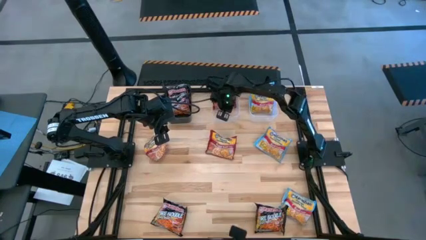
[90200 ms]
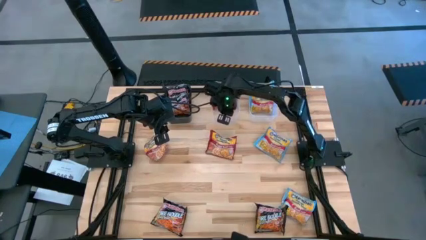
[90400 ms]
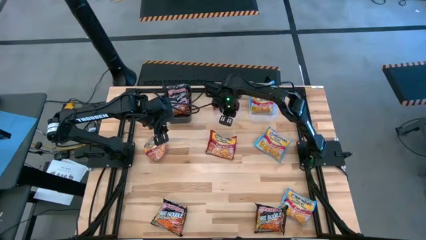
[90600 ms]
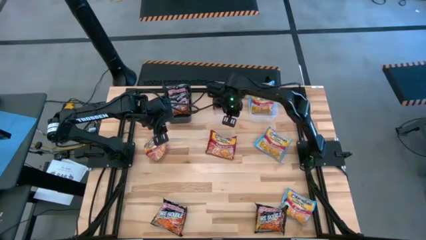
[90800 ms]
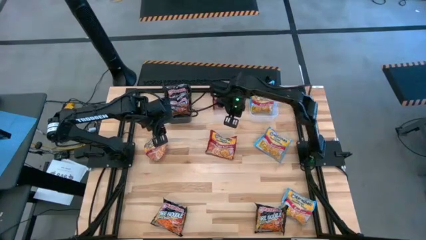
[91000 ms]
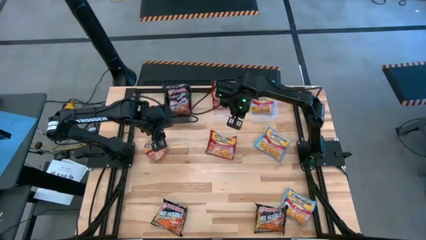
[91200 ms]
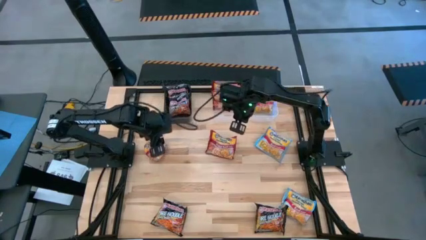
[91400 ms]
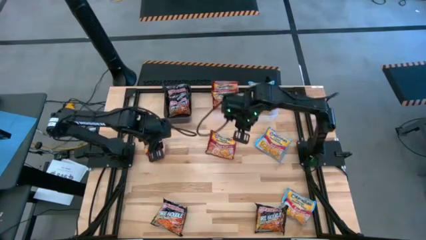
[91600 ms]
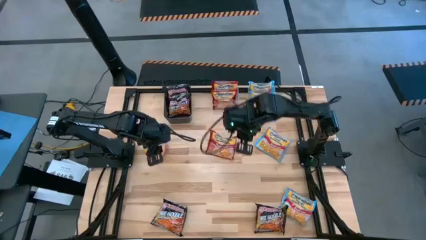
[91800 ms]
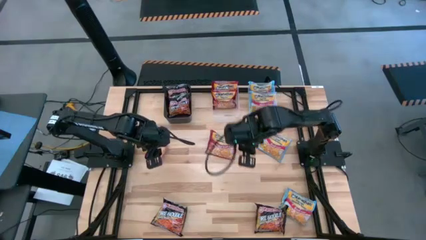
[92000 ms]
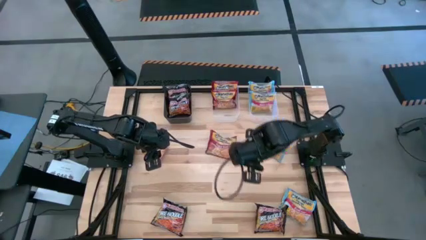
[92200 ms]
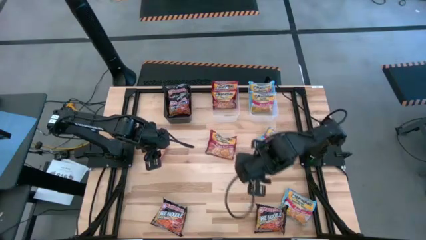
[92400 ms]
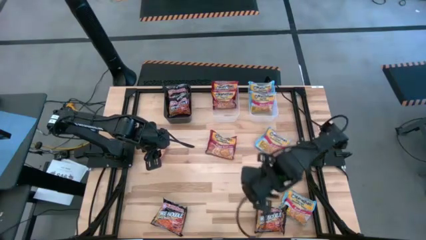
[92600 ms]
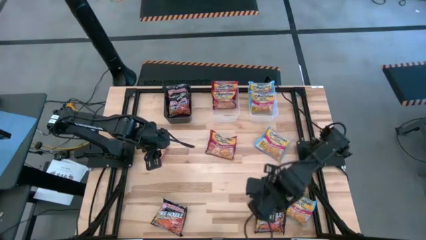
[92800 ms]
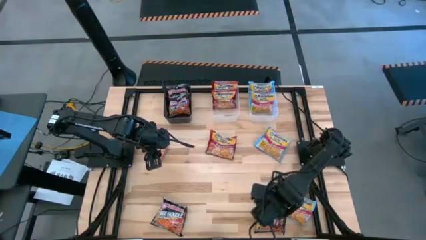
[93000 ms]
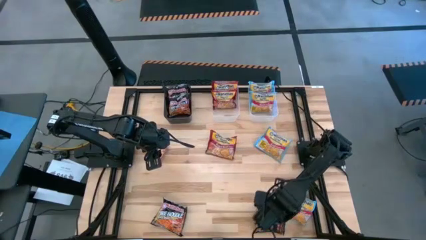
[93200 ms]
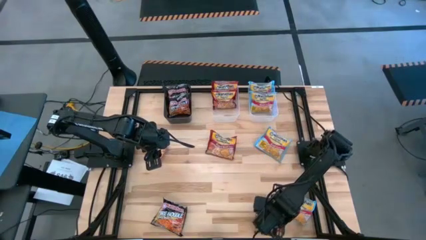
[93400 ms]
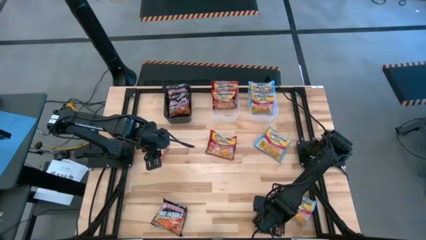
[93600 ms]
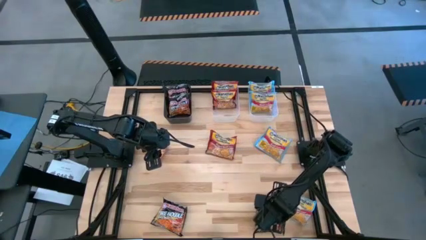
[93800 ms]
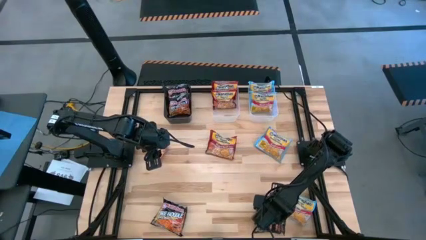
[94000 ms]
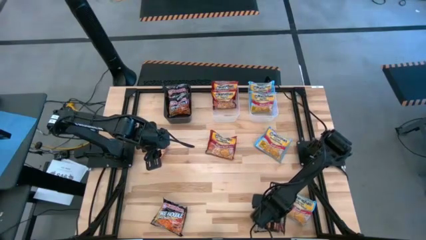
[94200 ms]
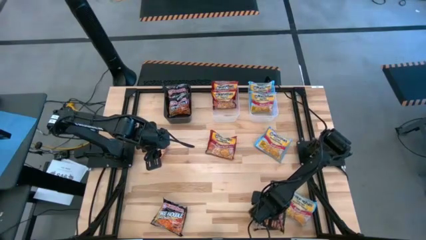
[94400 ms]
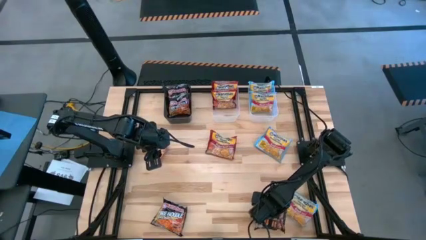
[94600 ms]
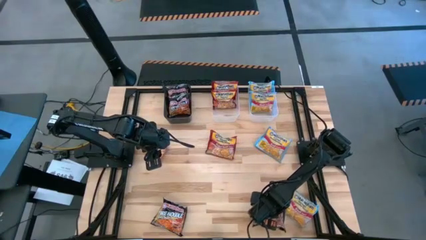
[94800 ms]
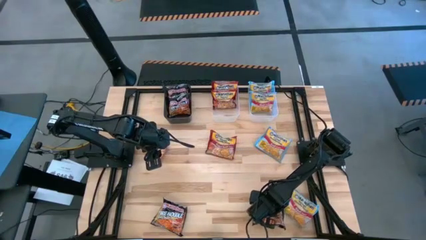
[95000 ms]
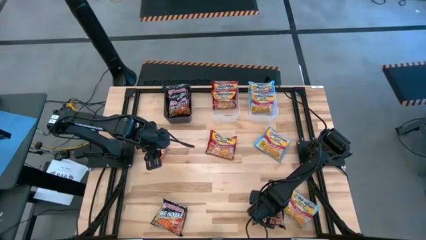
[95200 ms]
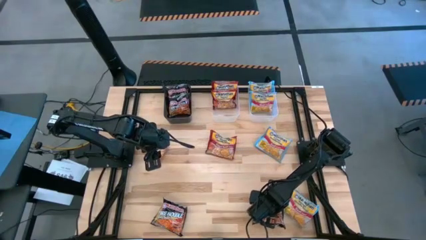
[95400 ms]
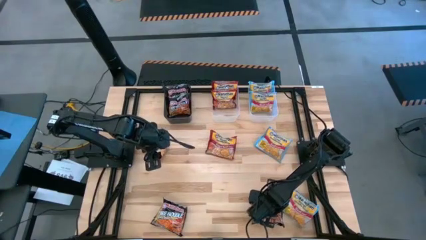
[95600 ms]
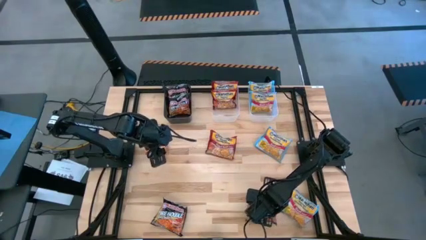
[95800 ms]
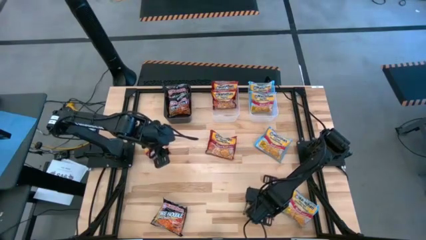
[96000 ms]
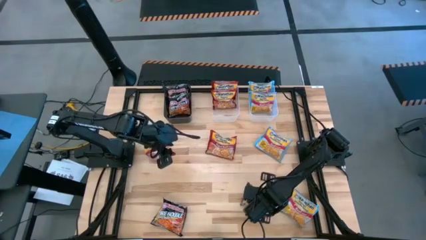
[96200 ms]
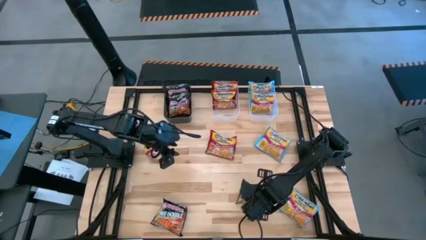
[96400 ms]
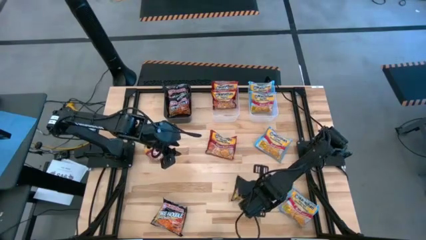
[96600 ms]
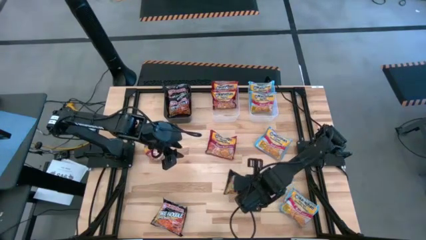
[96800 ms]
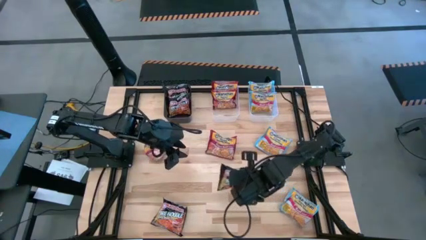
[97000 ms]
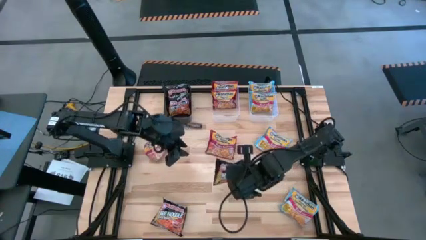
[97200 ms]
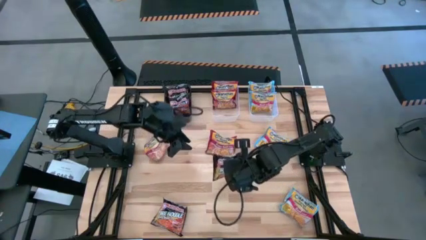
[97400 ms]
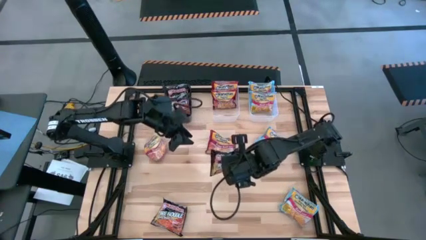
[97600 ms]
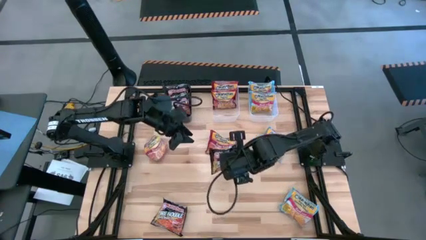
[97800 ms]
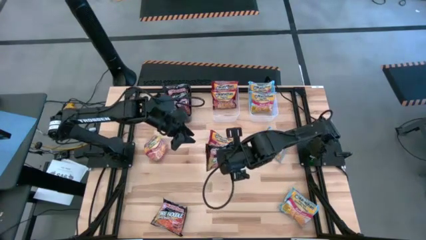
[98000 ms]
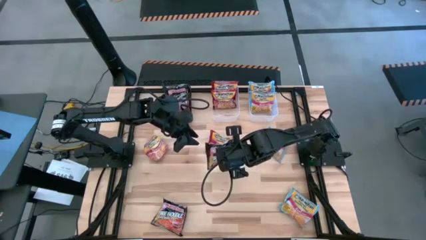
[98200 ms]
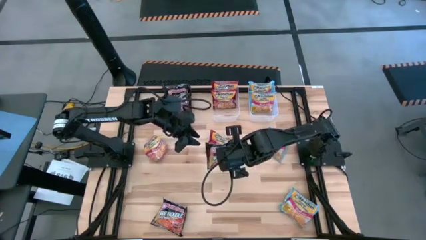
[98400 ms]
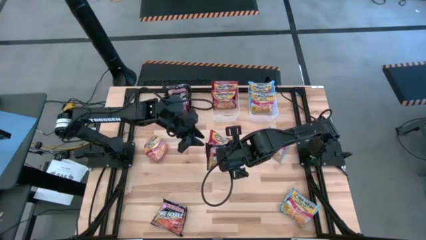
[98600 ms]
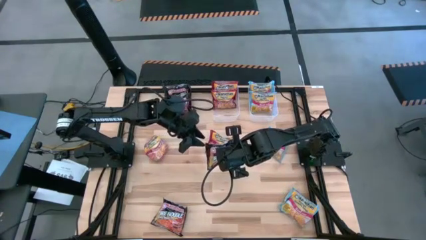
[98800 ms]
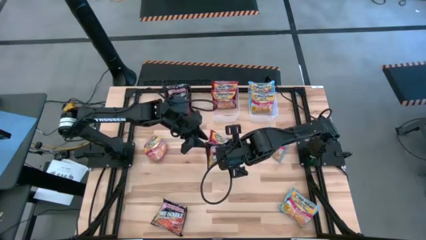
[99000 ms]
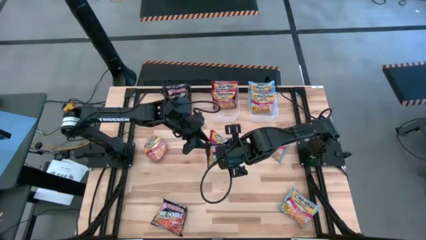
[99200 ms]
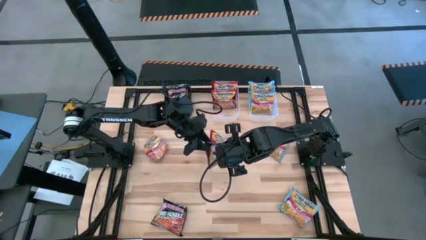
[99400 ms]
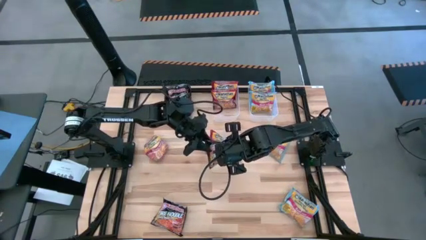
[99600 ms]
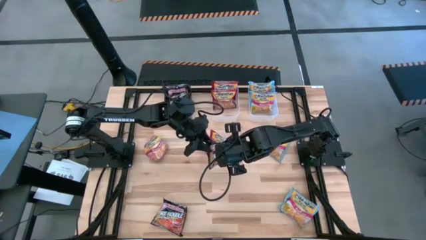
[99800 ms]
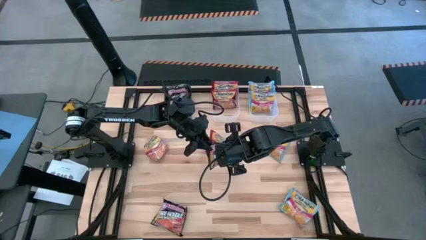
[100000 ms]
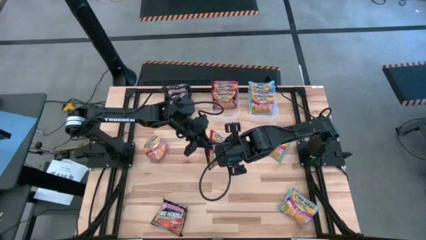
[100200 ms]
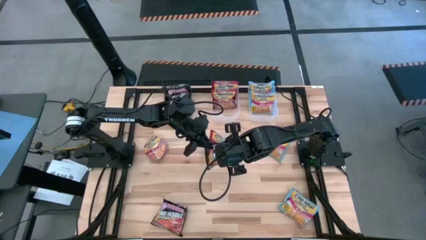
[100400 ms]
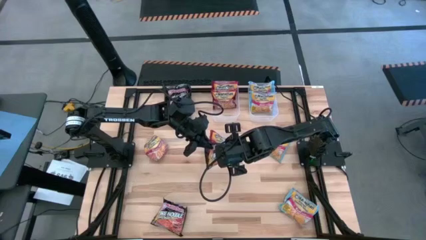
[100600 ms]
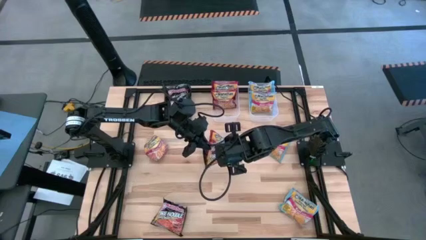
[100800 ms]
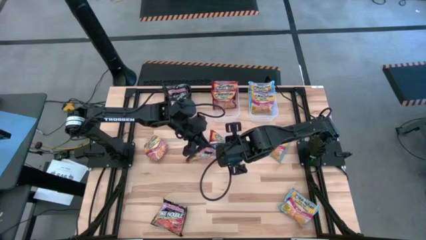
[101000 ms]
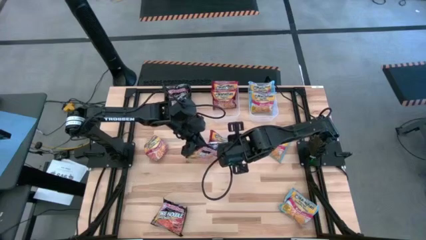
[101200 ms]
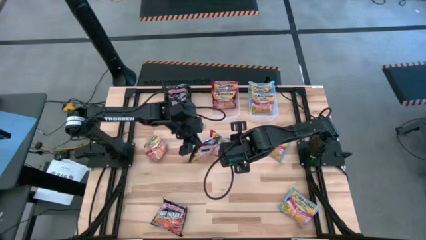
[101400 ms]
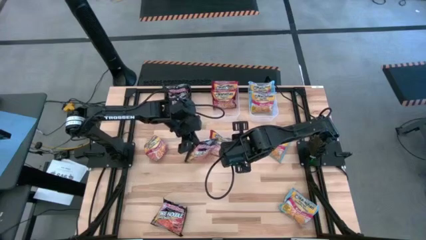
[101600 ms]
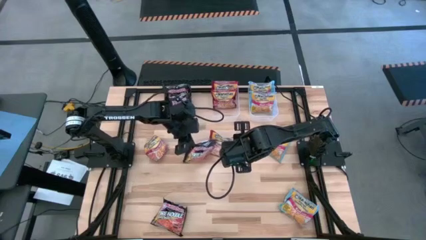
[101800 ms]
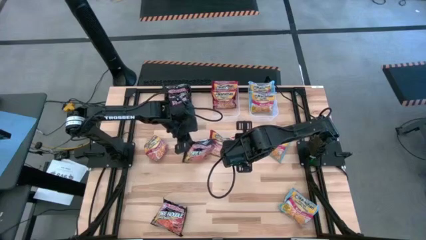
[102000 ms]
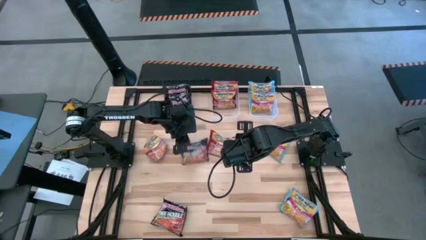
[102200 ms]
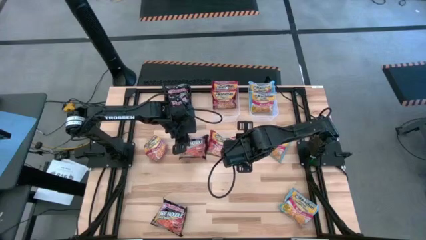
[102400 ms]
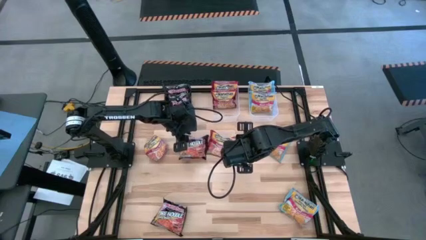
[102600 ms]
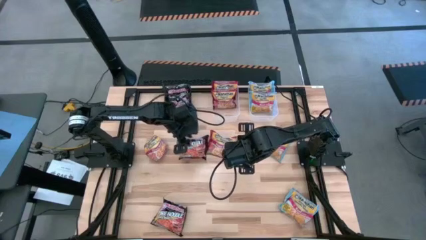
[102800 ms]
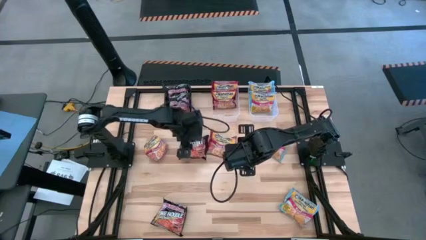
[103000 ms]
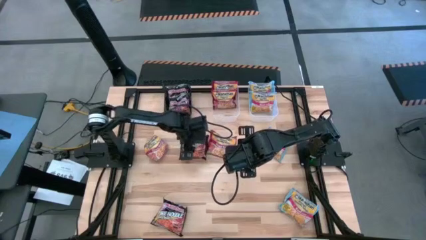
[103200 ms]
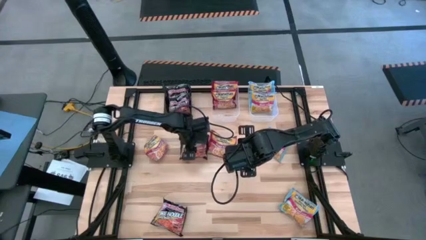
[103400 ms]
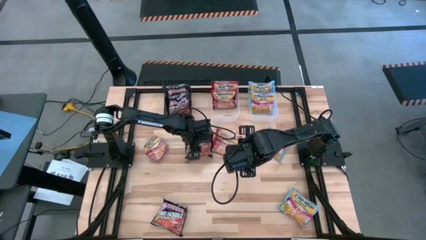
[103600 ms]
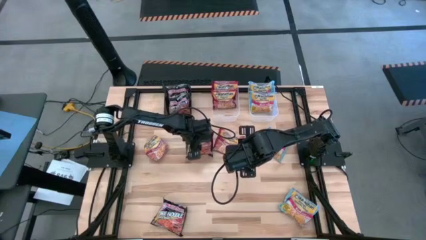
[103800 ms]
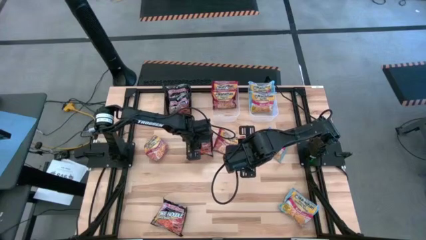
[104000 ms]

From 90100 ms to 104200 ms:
Task: Sort Maruchan noodles
Put the black noodle pack into the black bin
